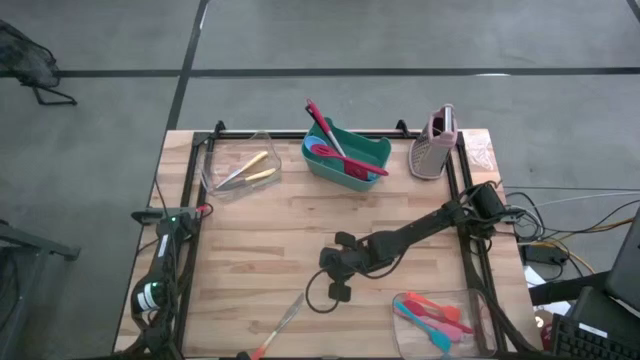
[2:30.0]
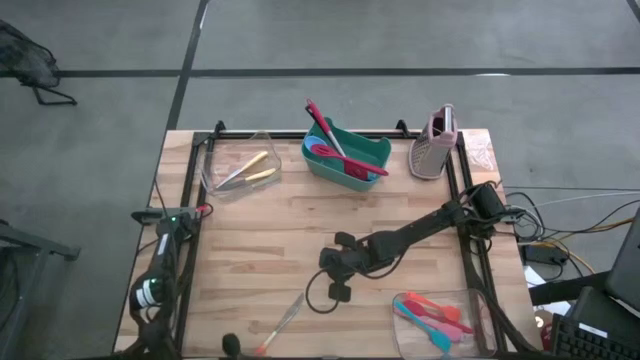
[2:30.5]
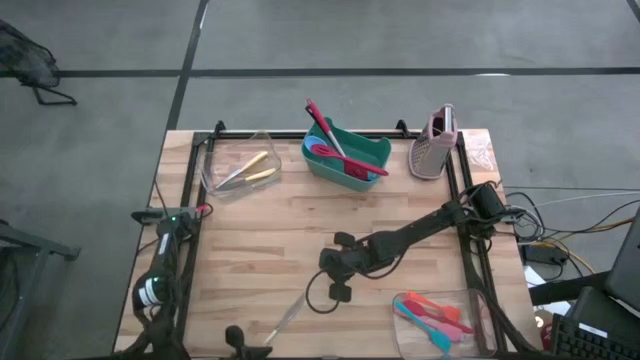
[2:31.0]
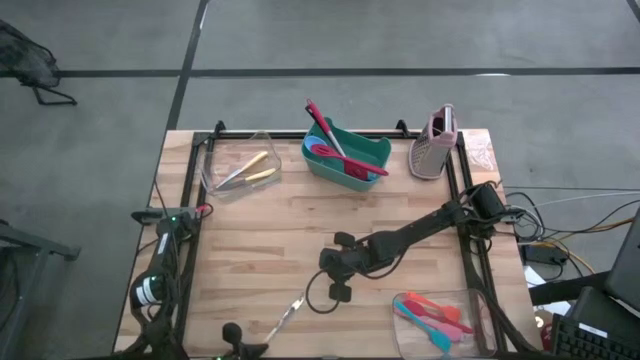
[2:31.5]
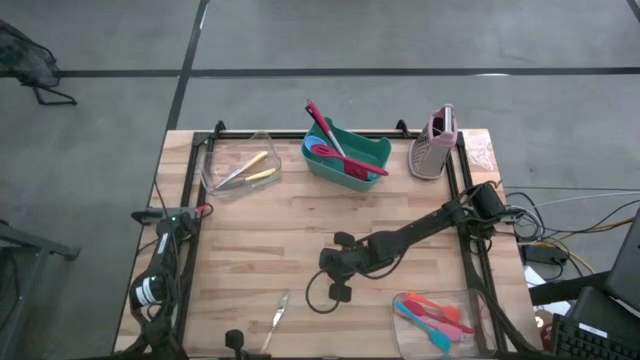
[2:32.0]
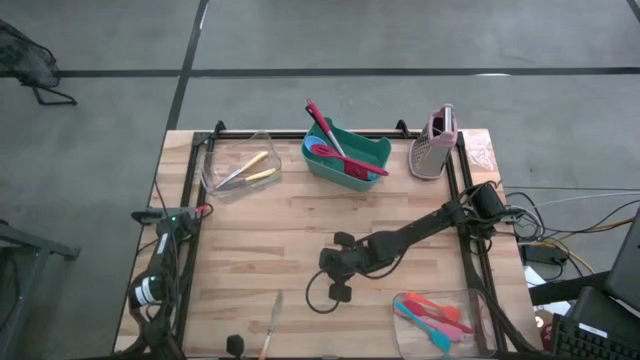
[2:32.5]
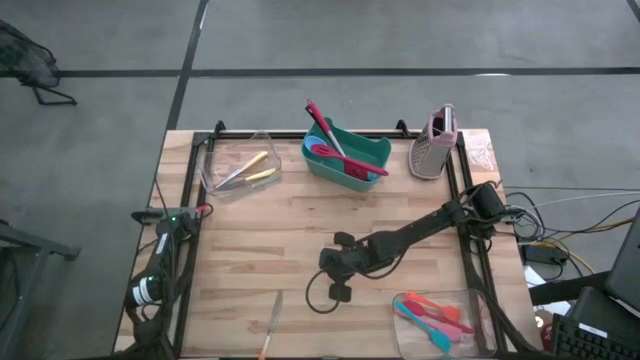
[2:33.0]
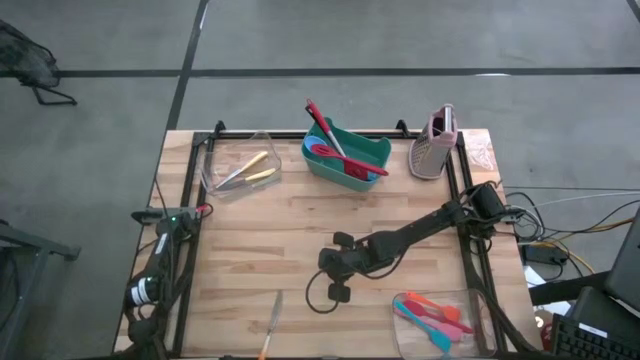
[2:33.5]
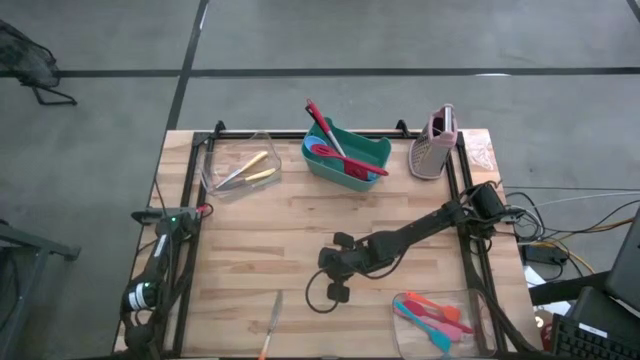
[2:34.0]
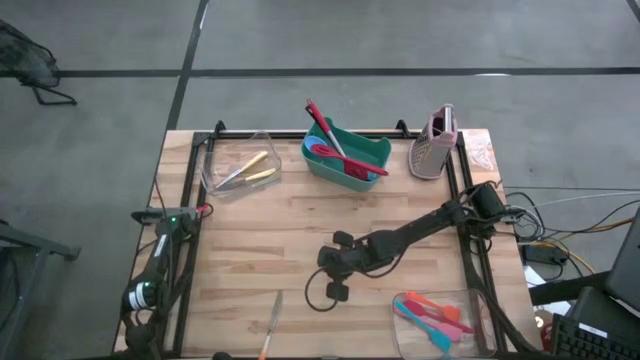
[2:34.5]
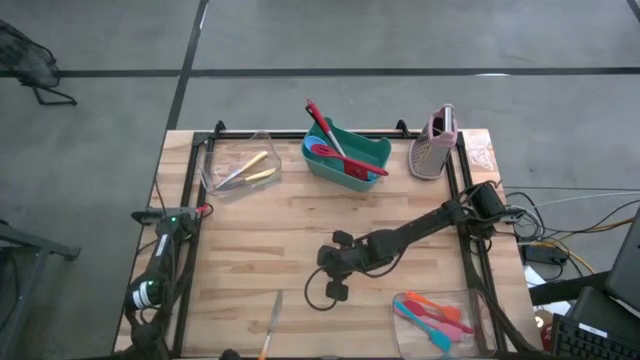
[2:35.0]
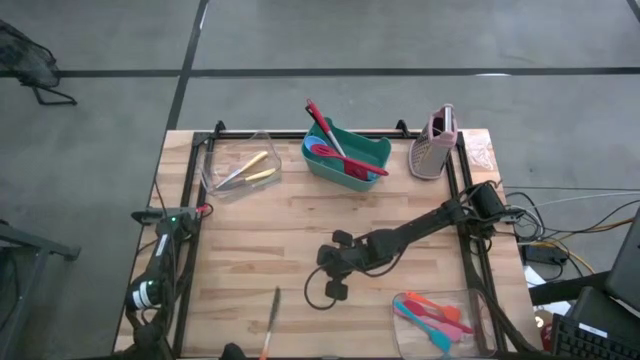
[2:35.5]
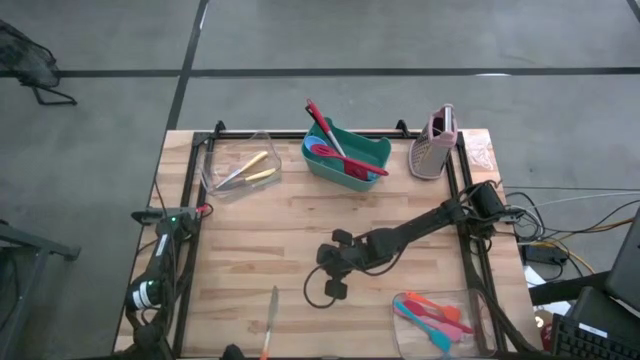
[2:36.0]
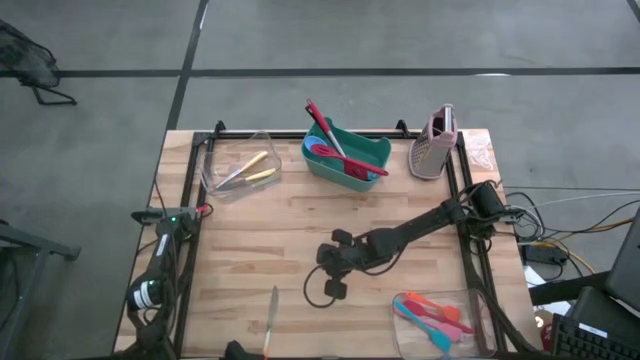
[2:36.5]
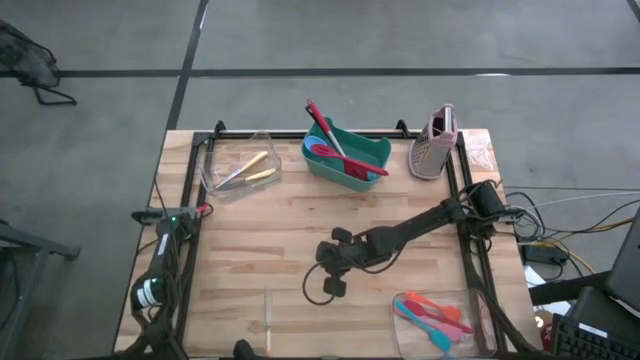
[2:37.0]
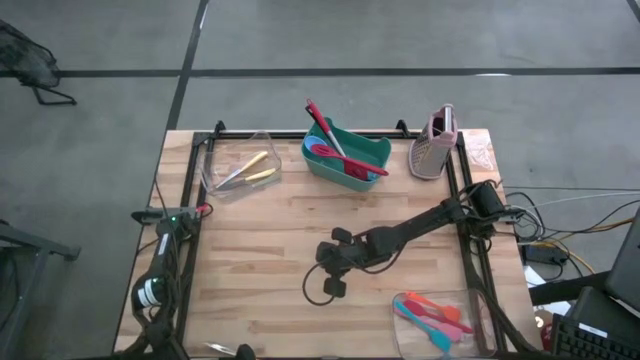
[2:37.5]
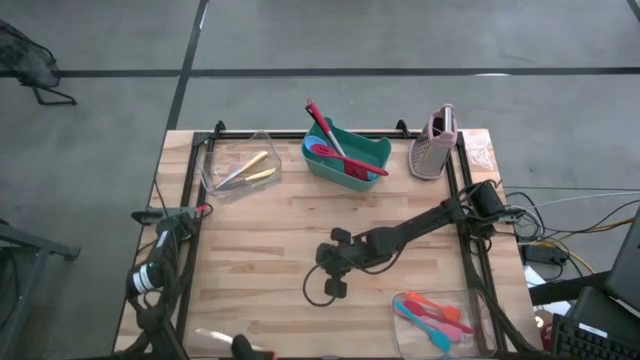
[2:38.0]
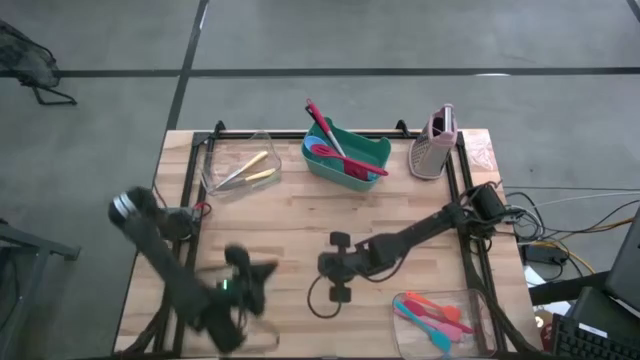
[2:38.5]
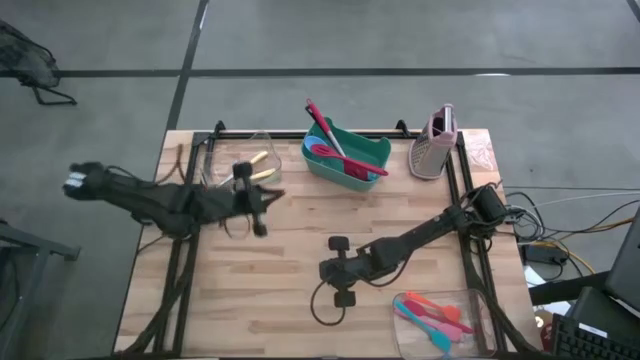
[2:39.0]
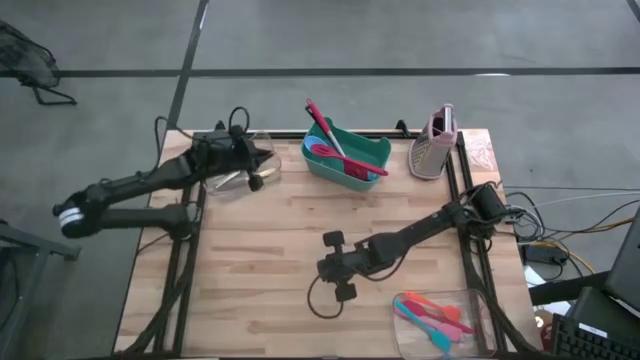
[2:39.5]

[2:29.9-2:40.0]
Task: Pick & Place Kitchen Items
Put the orange table knife into the top transparent bin

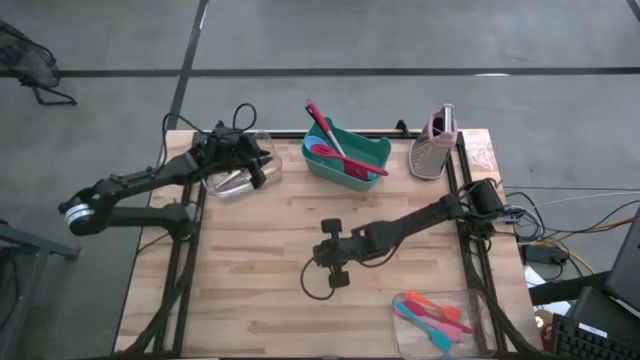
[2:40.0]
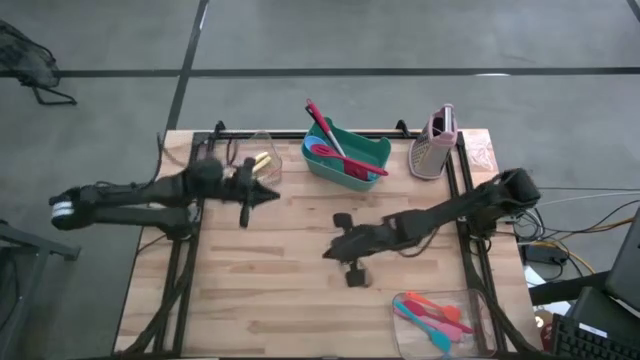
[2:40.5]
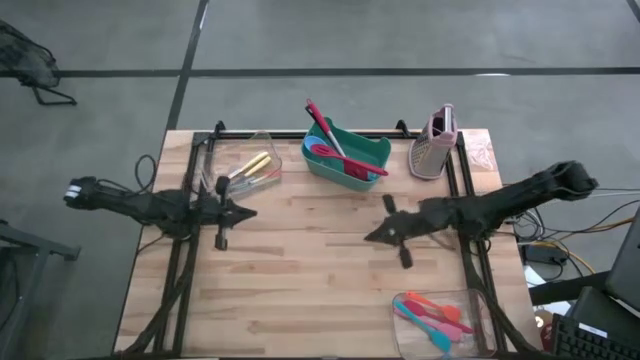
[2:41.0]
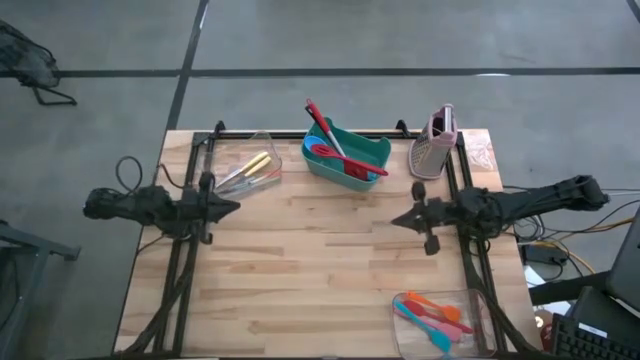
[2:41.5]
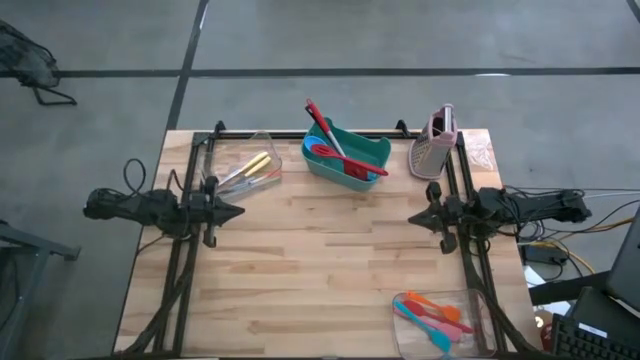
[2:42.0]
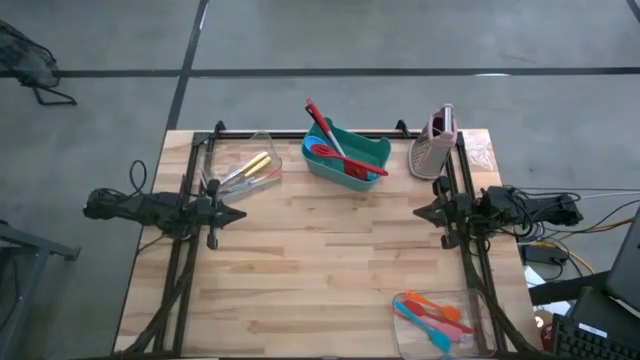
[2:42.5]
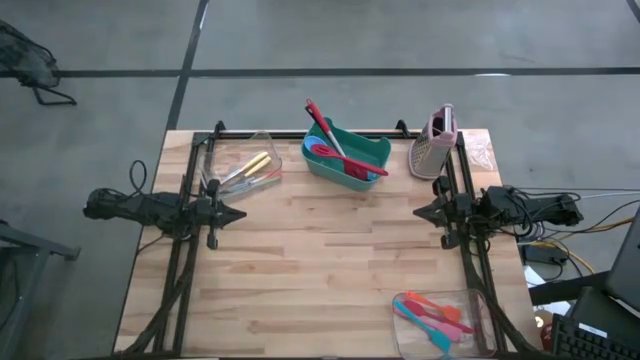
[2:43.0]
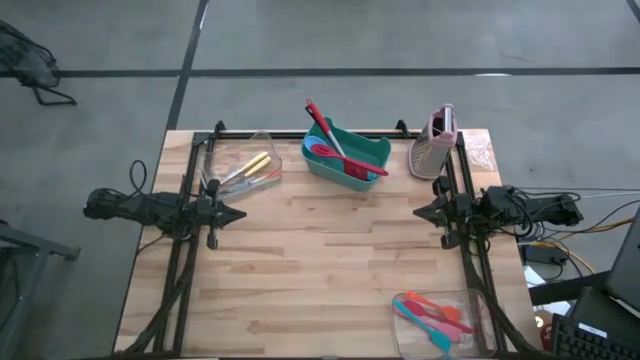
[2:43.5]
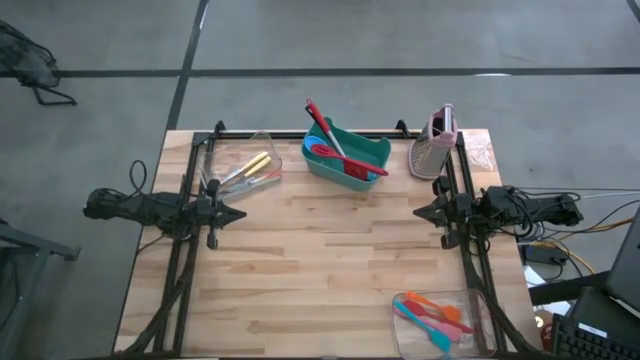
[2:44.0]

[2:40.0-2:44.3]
Return to Home Position

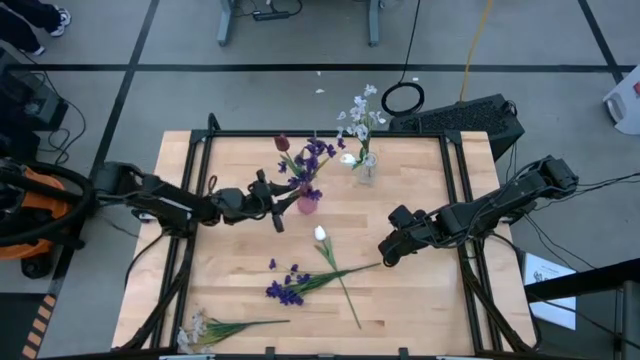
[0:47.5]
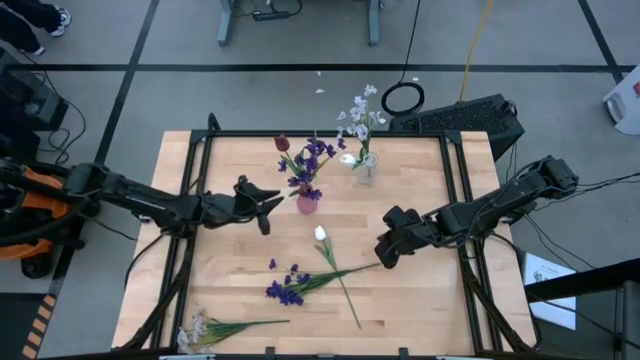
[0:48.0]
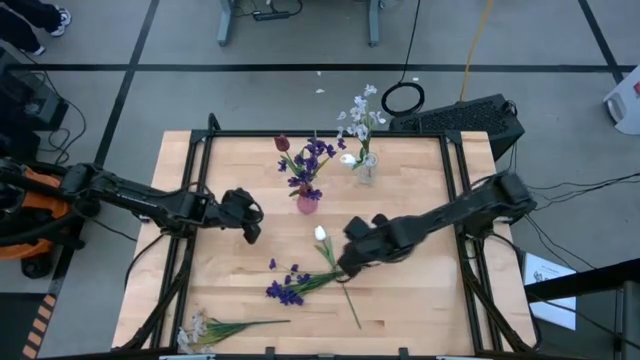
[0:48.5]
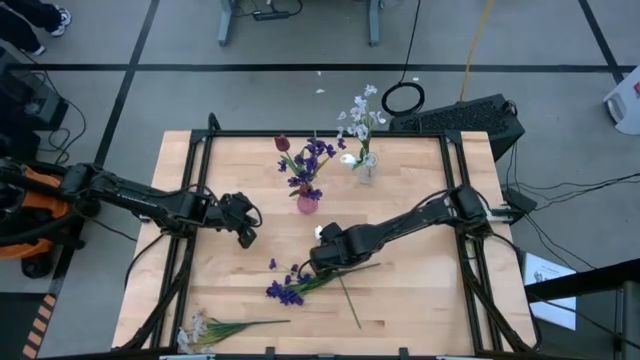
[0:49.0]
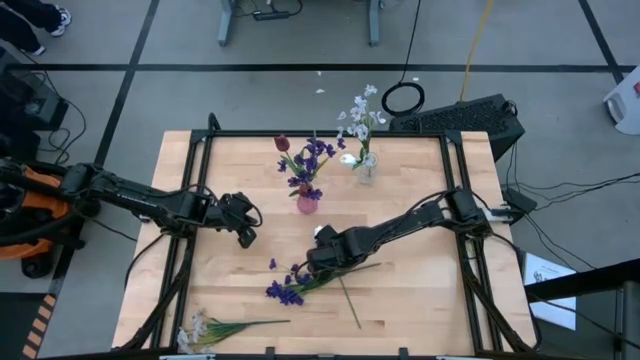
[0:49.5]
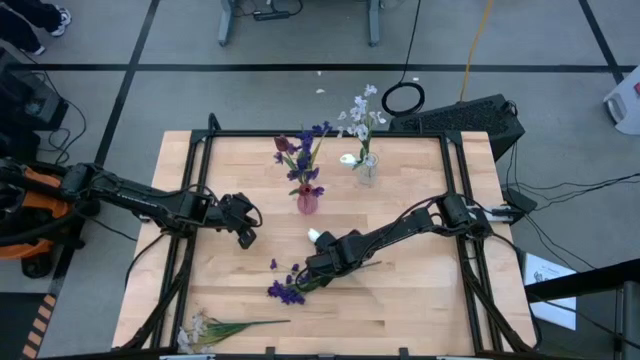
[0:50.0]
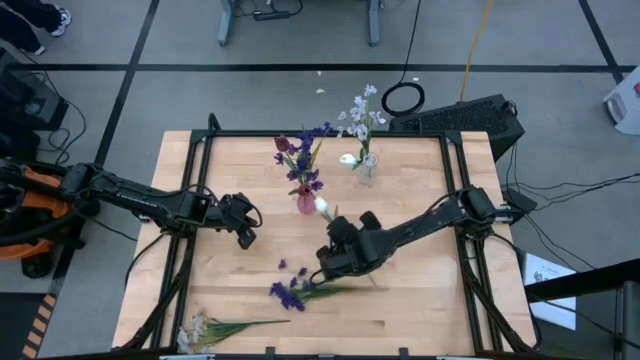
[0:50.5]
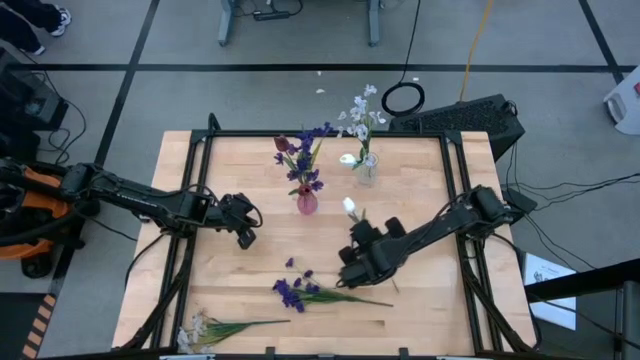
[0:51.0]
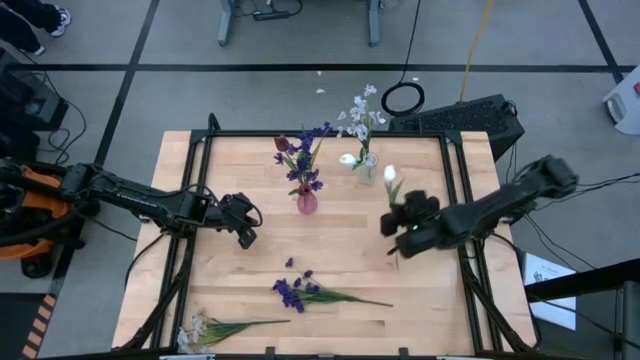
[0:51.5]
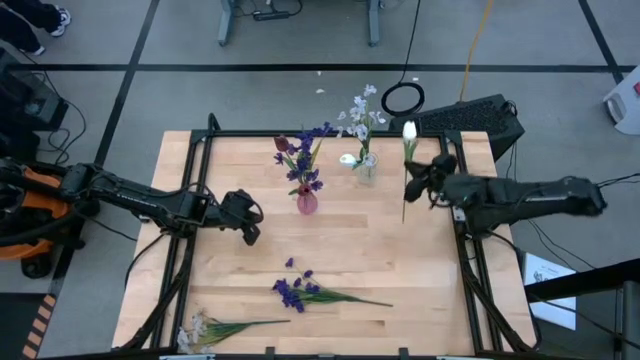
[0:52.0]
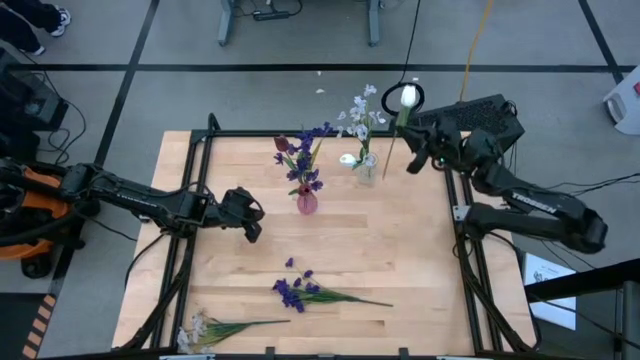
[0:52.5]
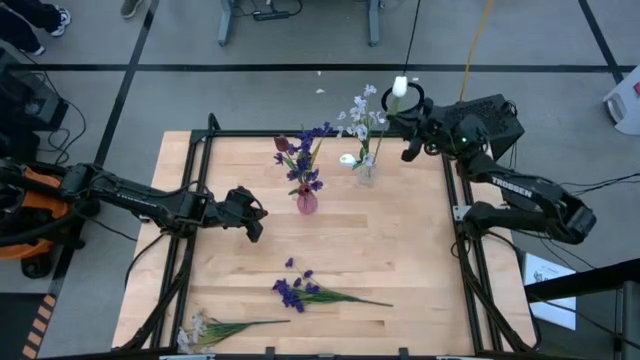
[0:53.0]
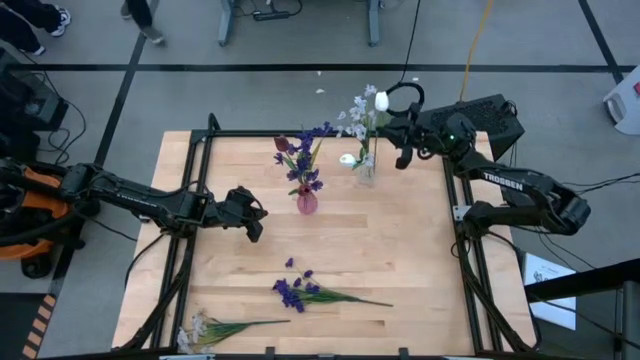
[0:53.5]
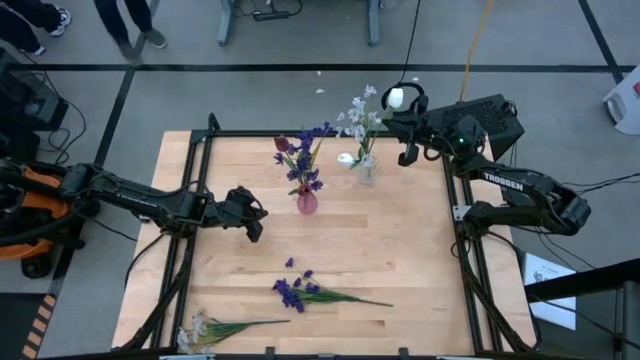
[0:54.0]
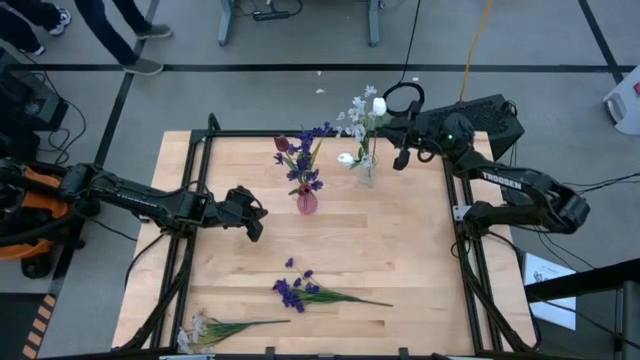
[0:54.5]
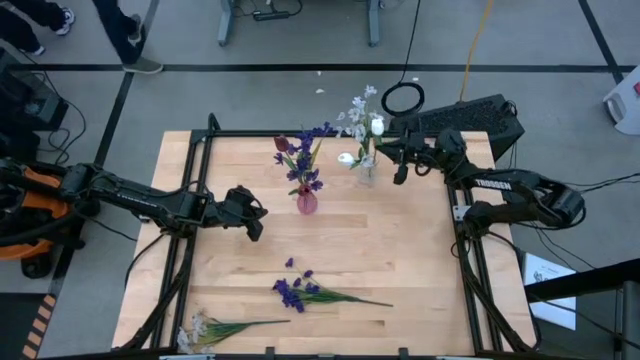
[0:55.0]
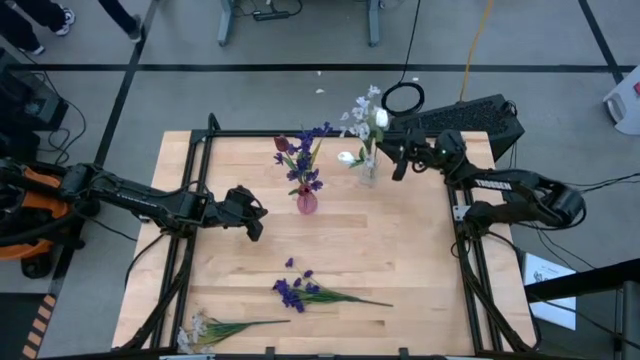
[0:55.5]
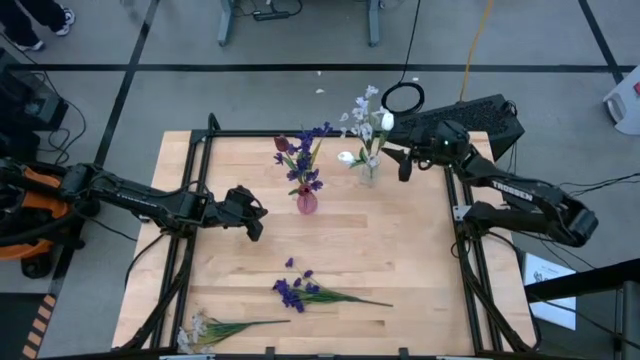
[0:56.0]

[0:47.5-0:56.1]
Task: Sort flowers into vase by color
Put the white tulip flower into the transparent vase
